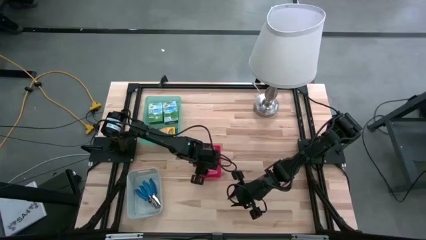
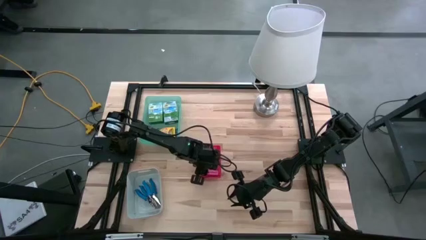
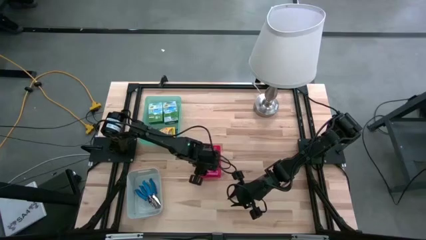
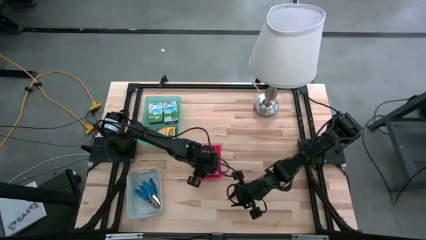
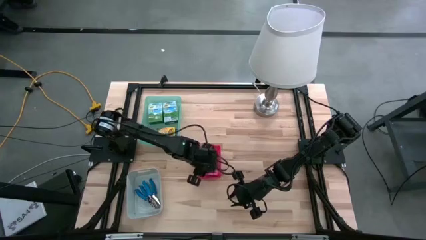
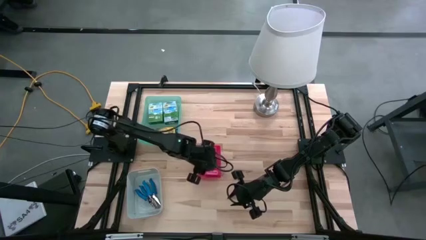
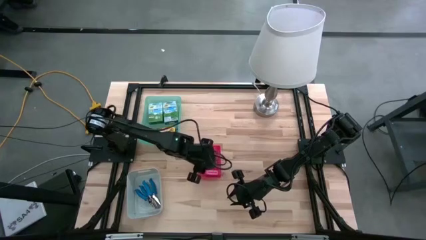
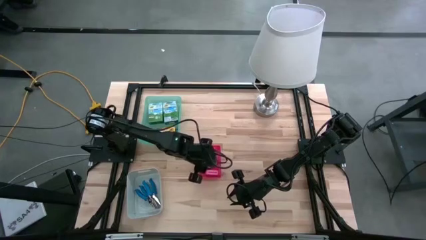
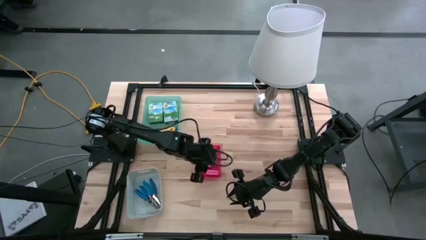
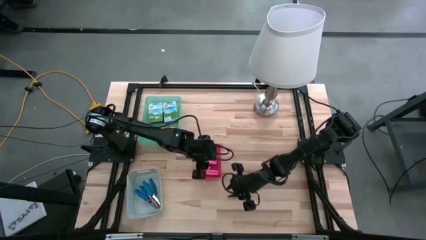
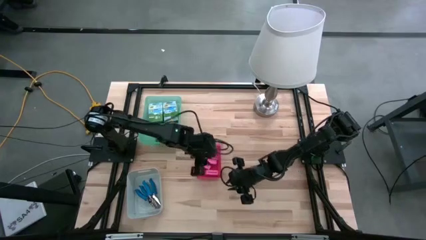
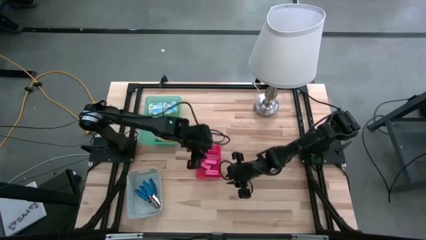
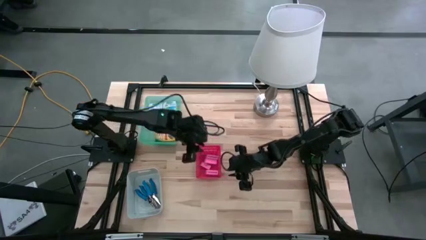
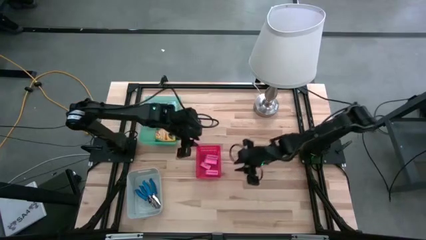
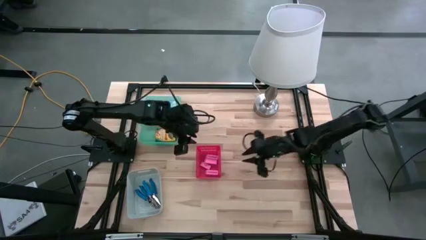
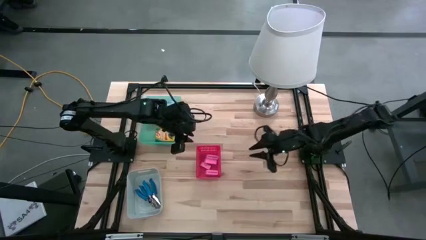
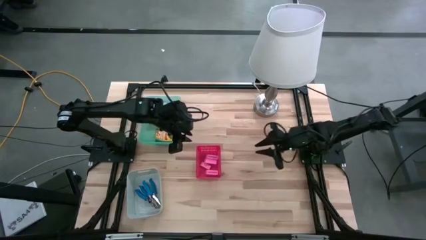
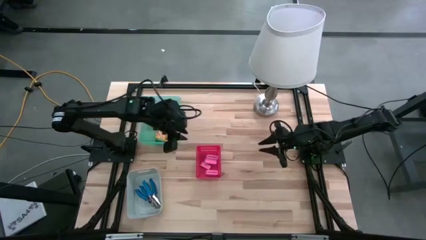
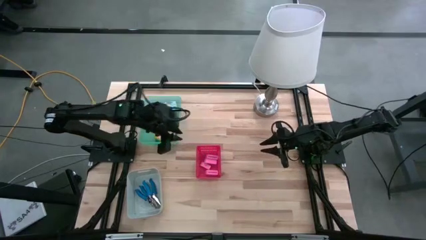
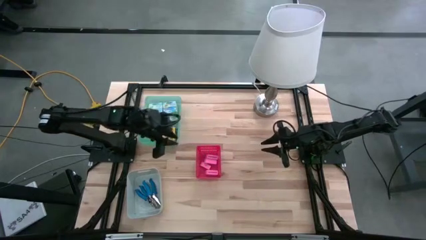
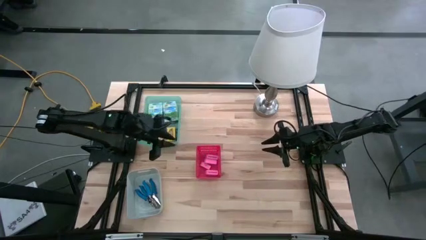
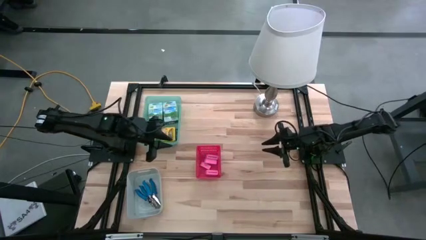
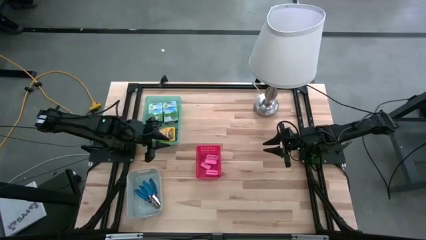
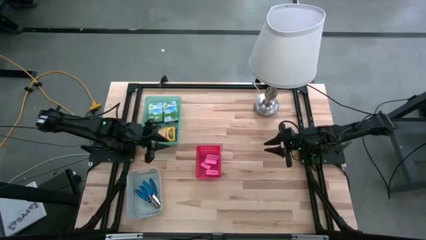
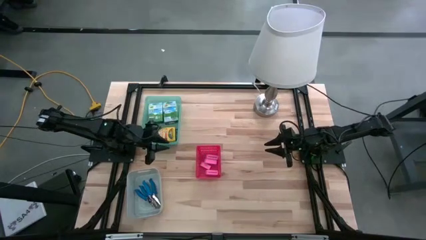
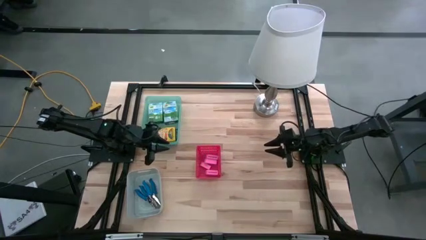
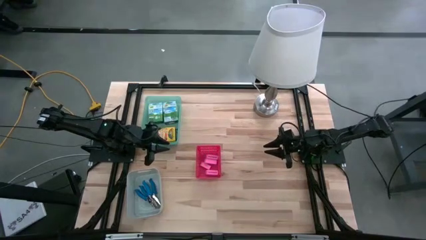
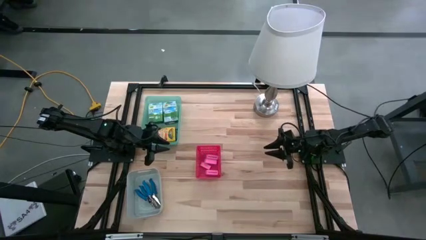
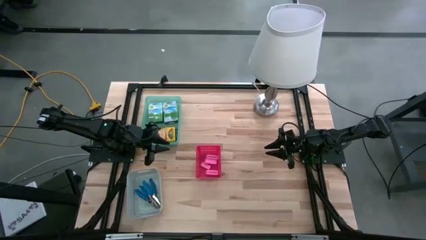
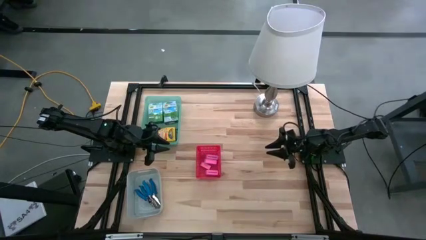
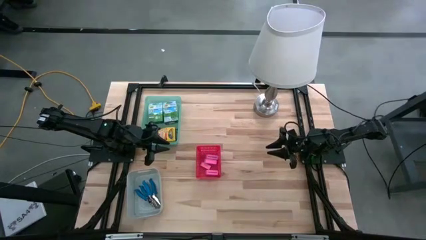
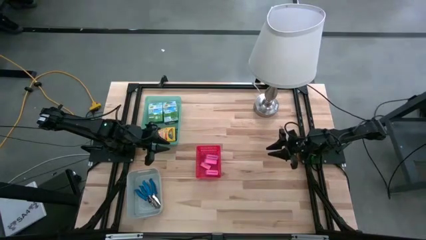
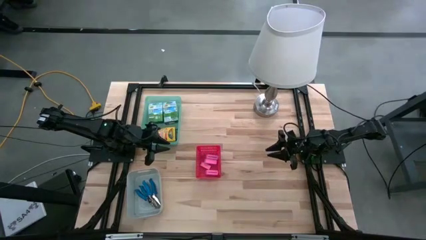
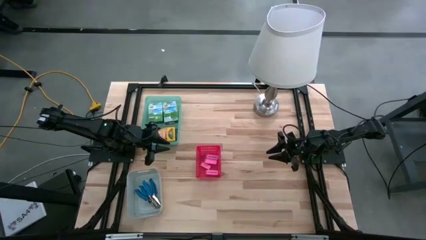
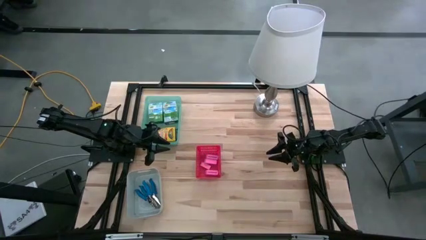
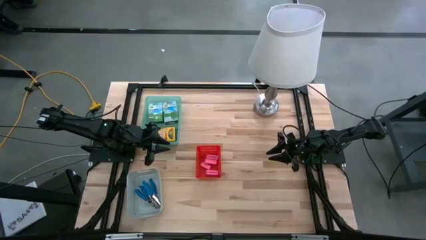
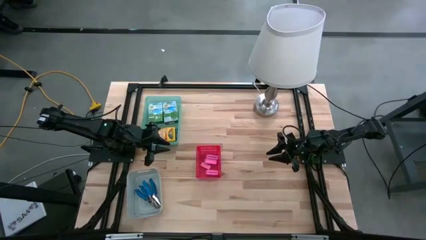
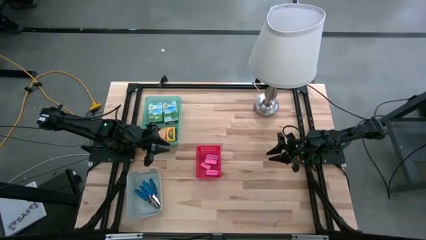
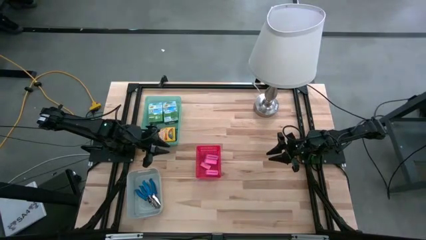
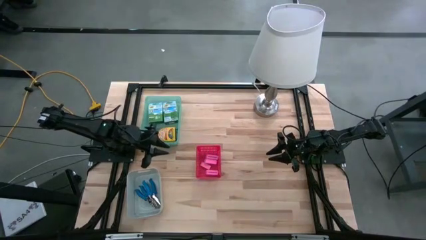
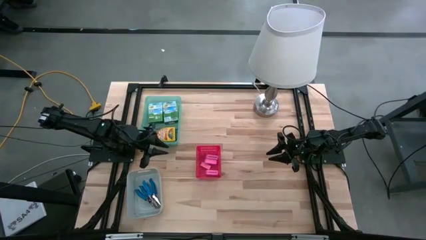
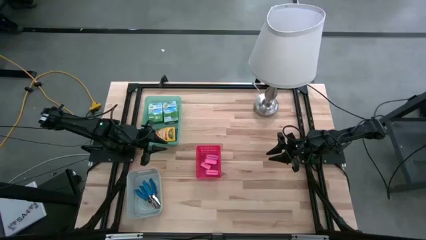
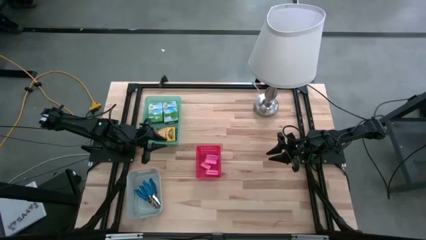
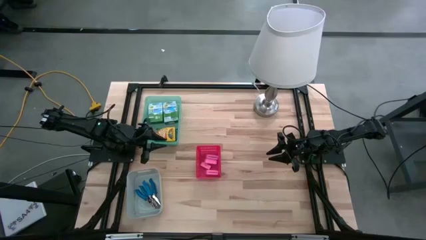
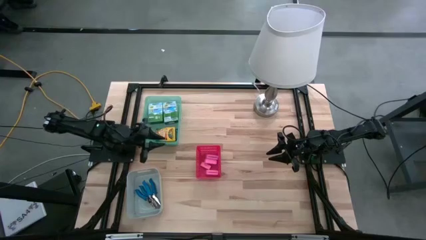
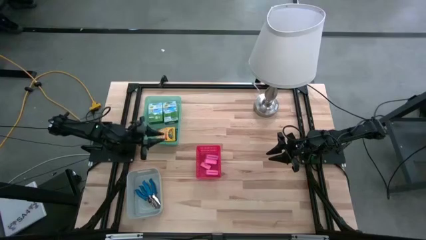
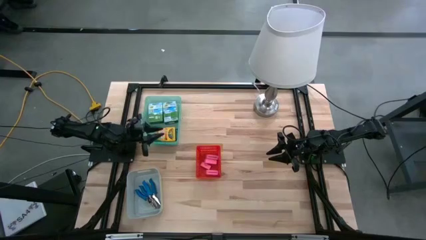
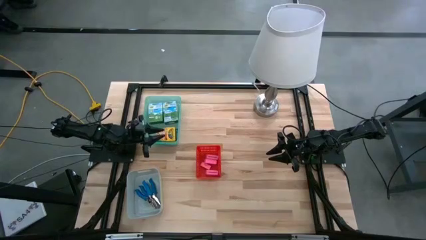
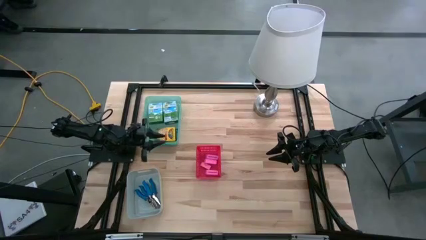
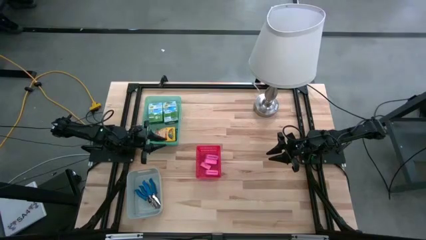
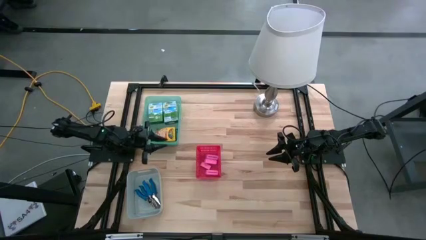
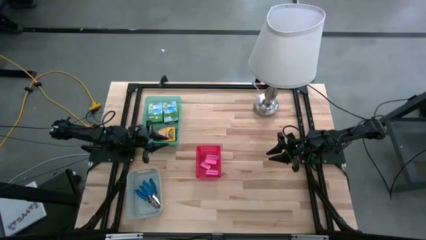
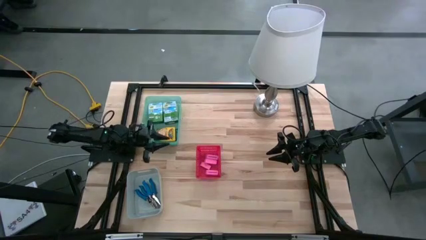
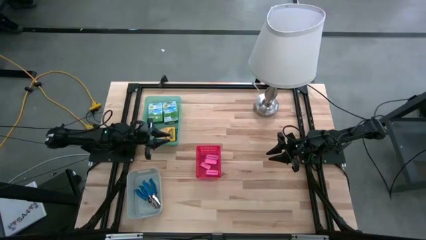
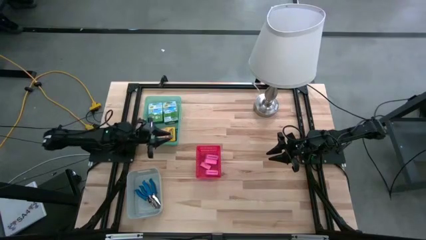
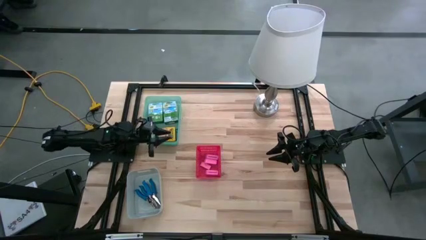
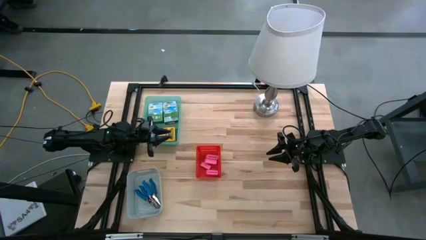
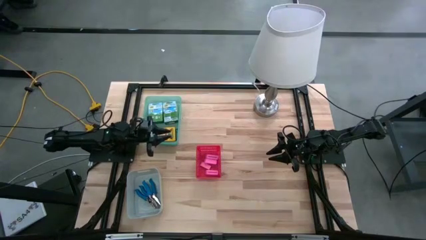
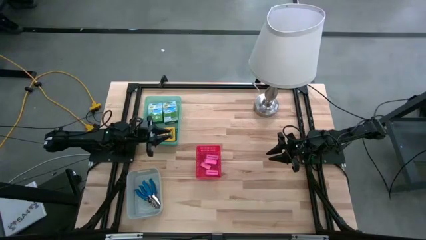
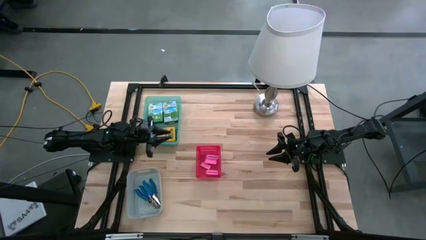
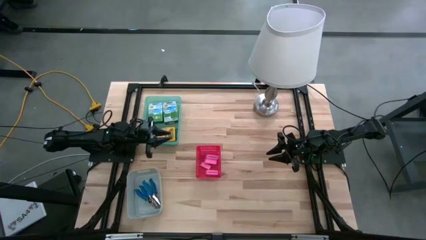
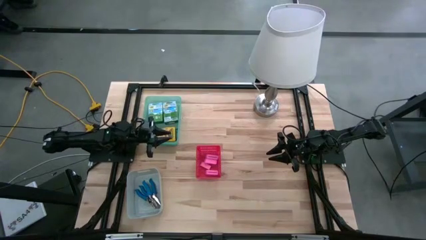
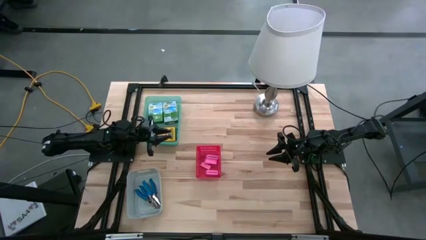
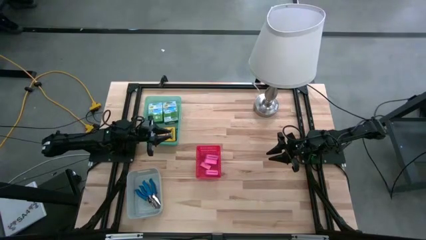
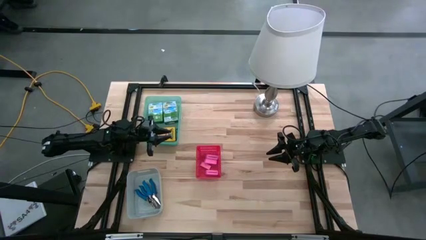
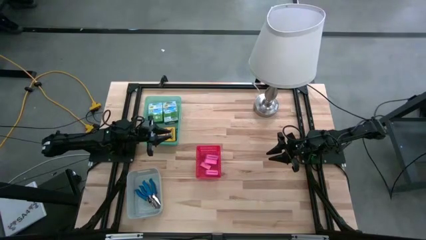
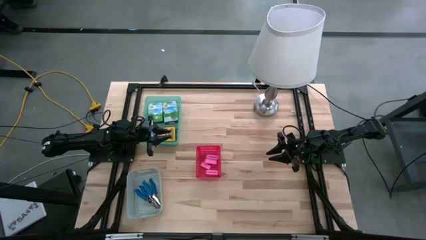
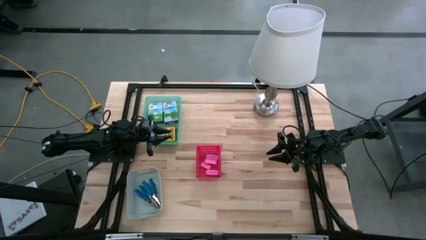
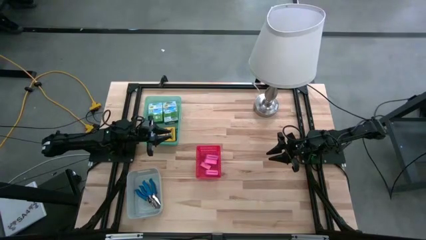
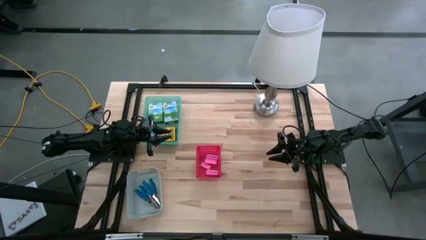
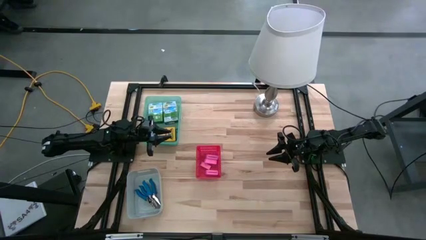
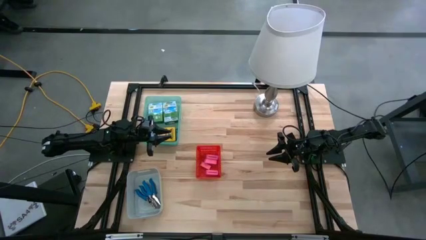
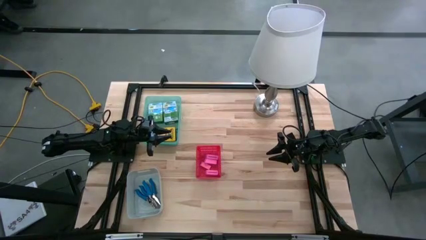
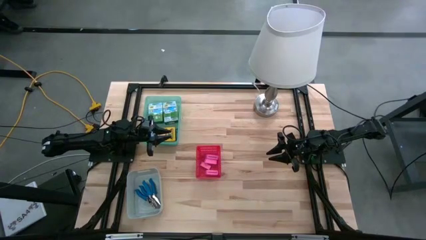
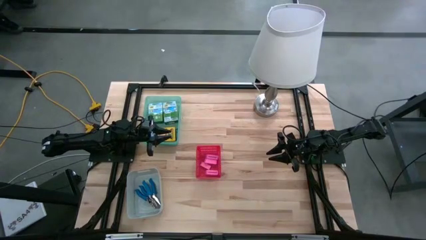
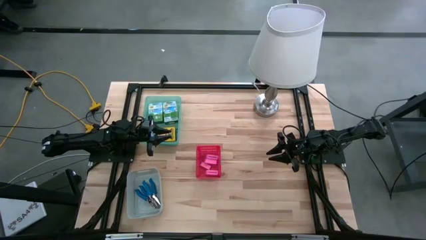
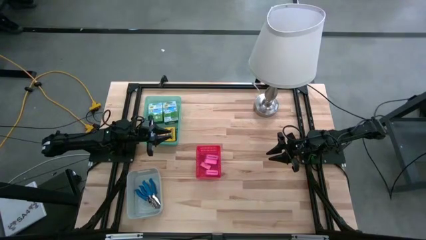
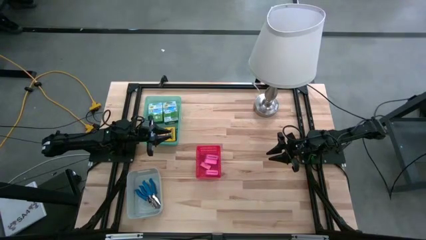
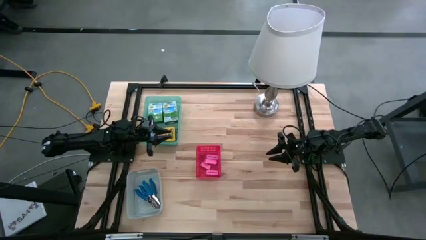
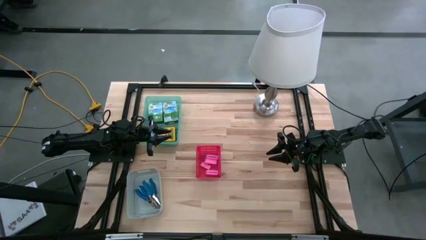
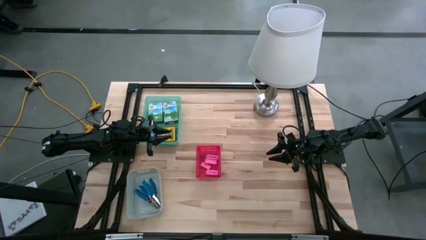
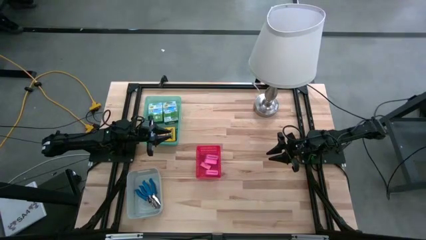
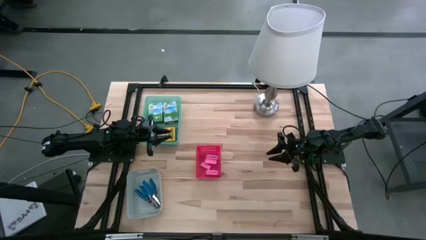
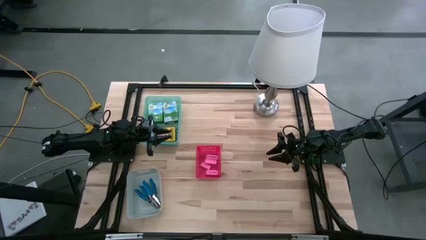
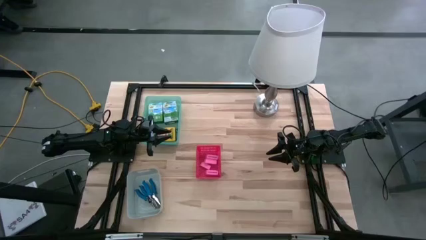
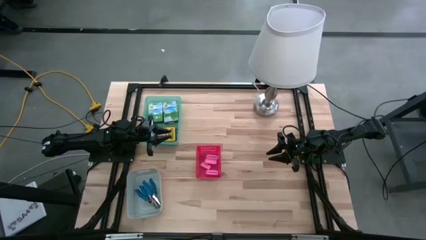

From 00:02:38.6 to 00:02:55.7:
Task: Pick & Place School Supplies
Return to Home Position
